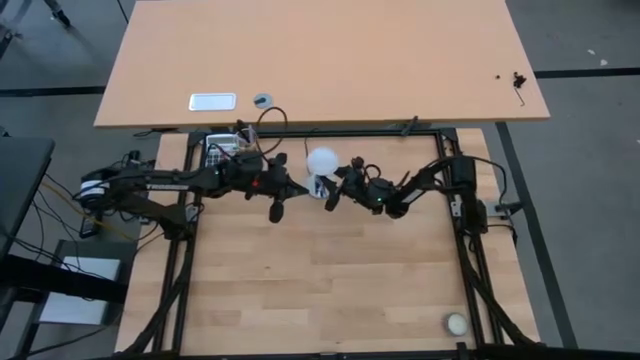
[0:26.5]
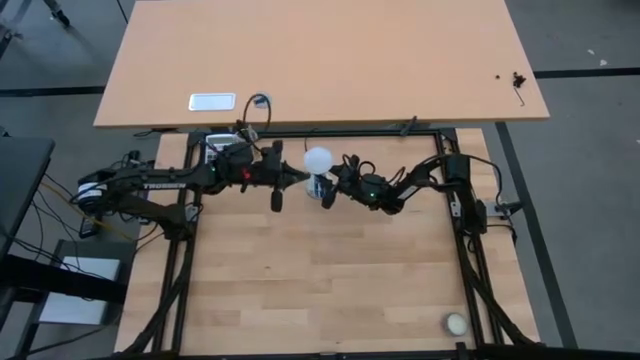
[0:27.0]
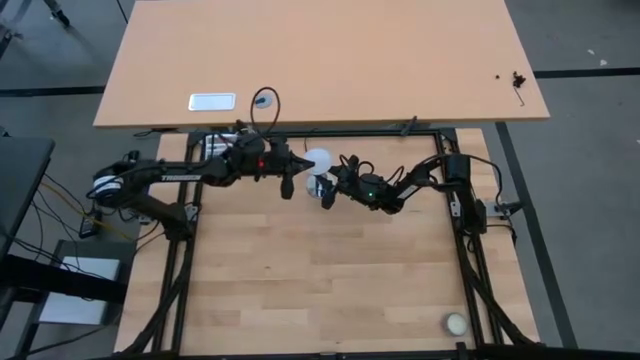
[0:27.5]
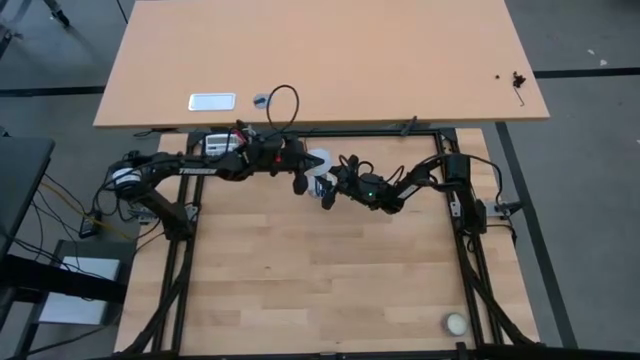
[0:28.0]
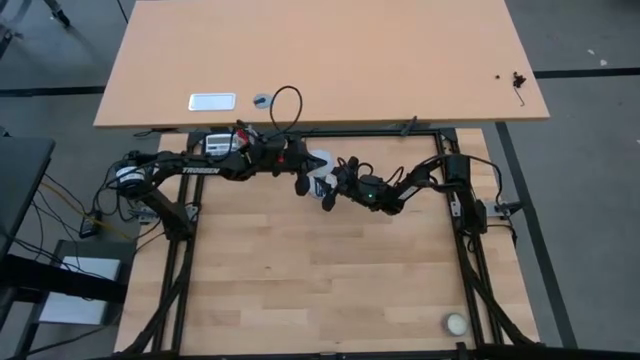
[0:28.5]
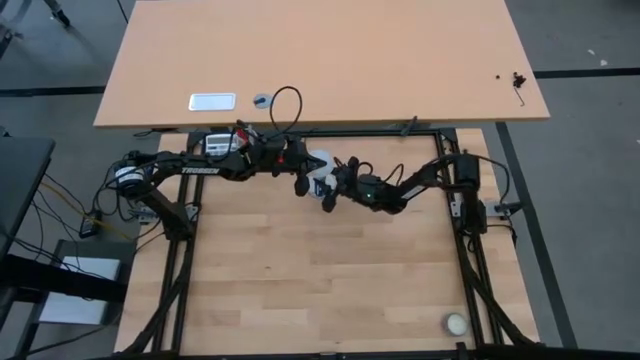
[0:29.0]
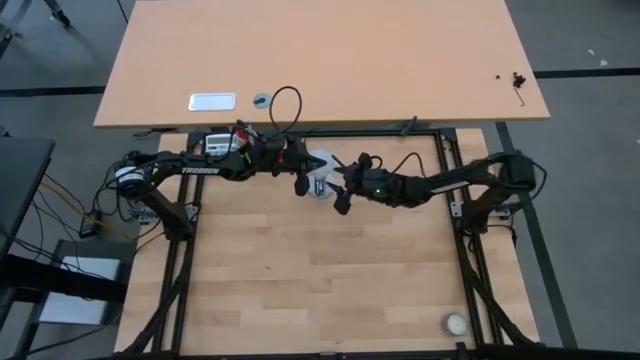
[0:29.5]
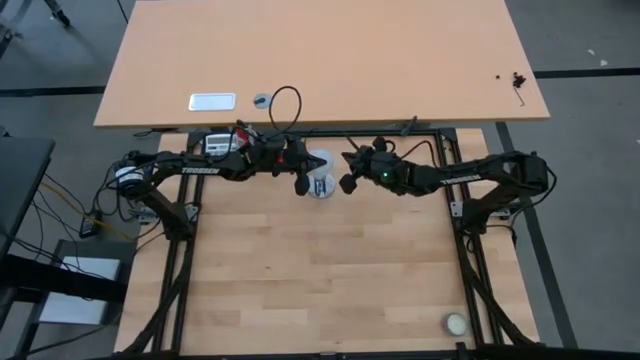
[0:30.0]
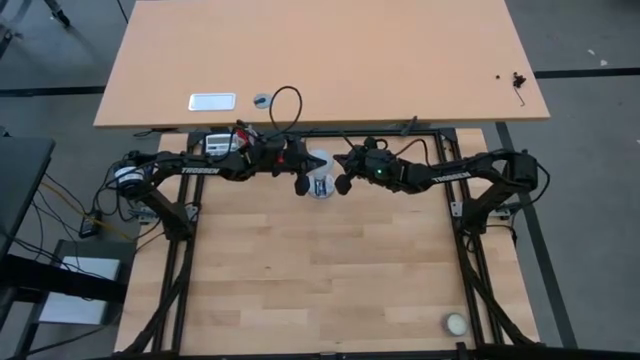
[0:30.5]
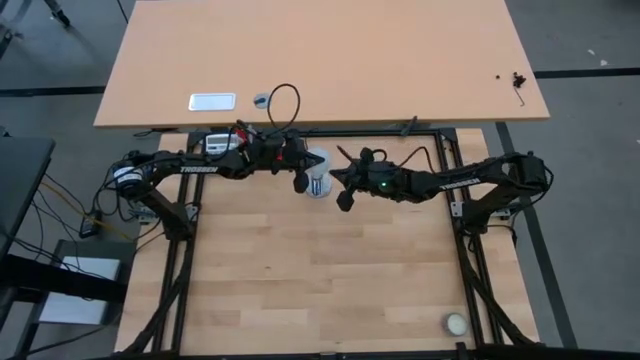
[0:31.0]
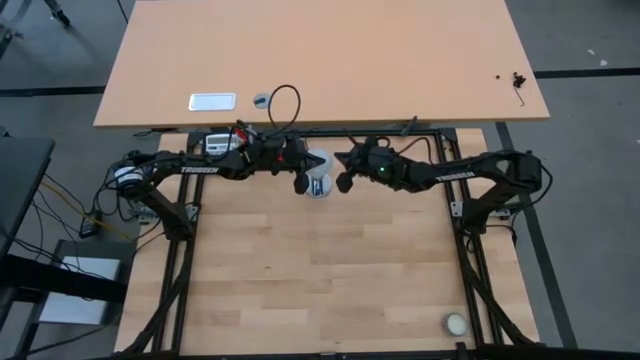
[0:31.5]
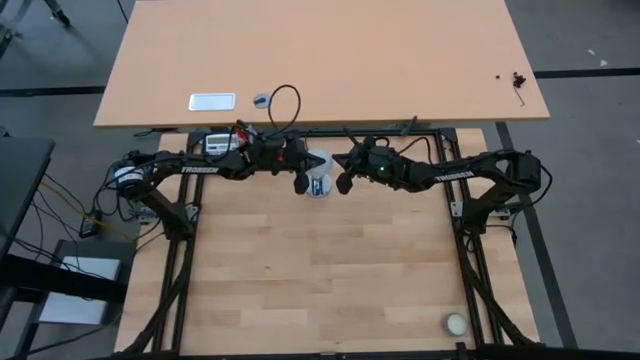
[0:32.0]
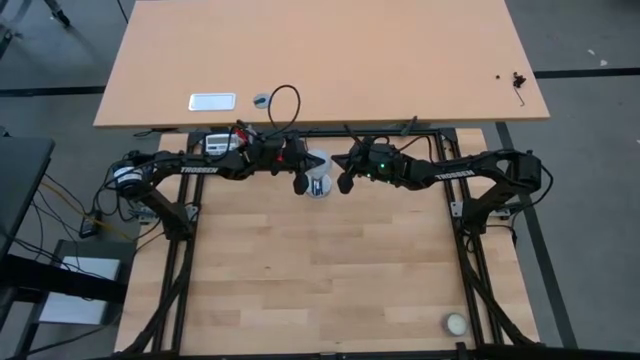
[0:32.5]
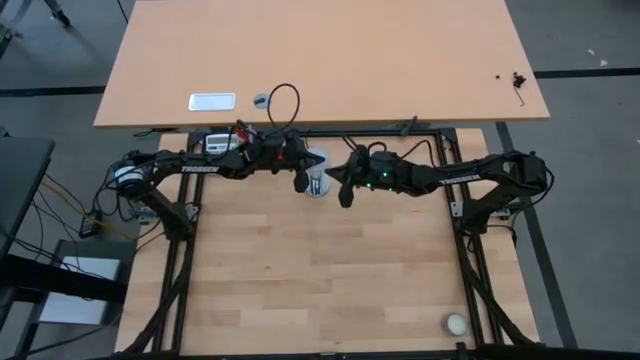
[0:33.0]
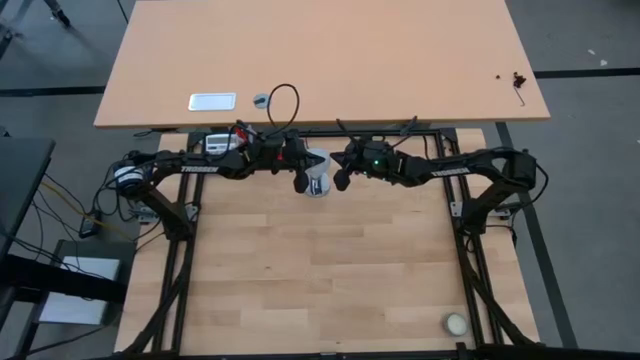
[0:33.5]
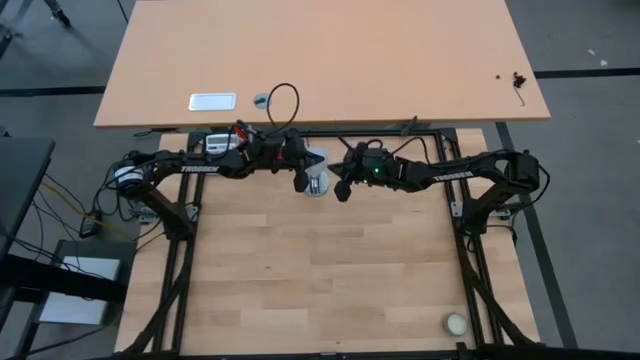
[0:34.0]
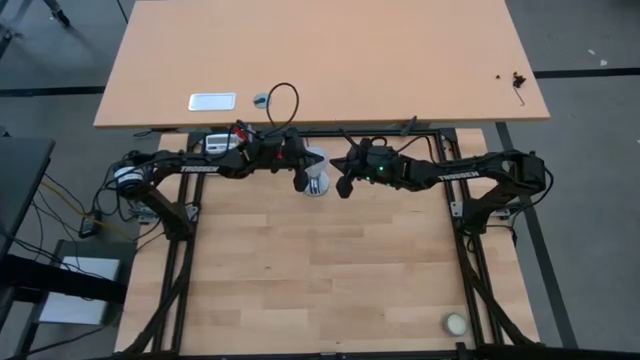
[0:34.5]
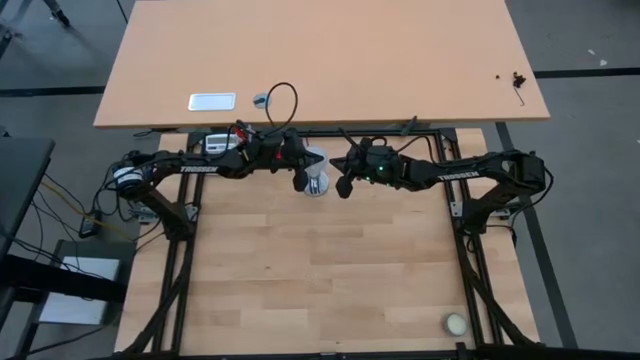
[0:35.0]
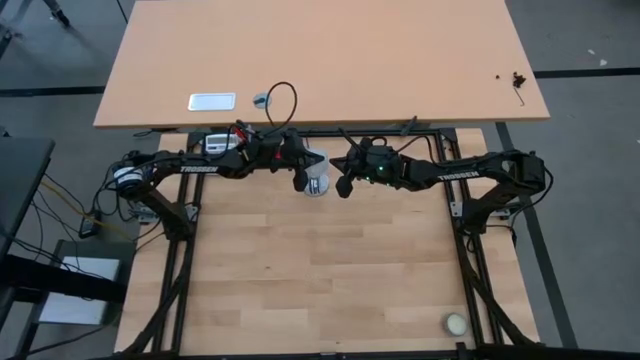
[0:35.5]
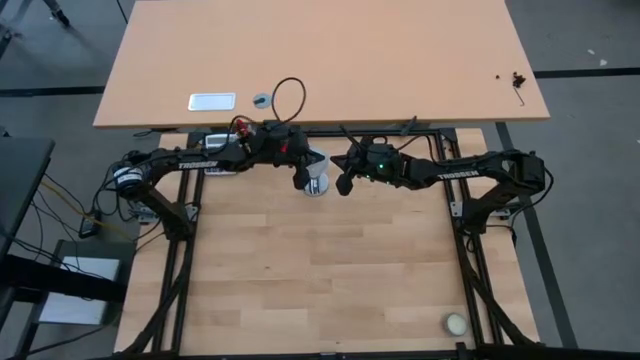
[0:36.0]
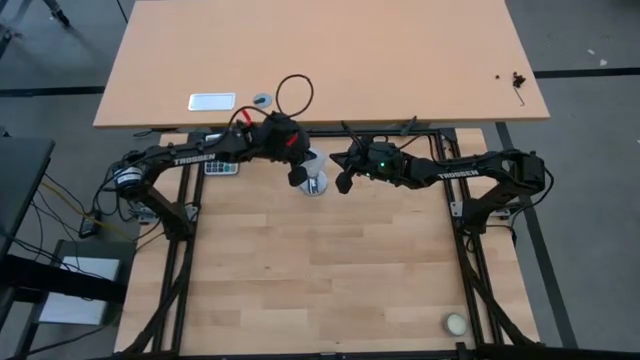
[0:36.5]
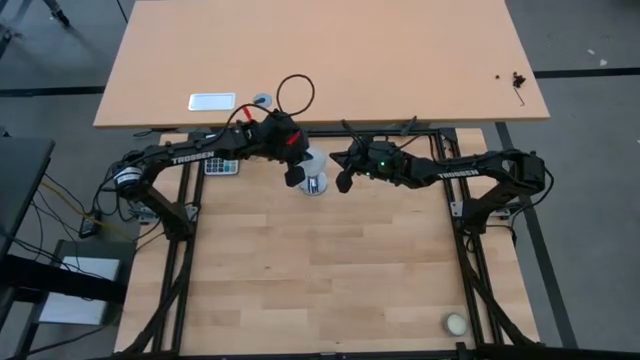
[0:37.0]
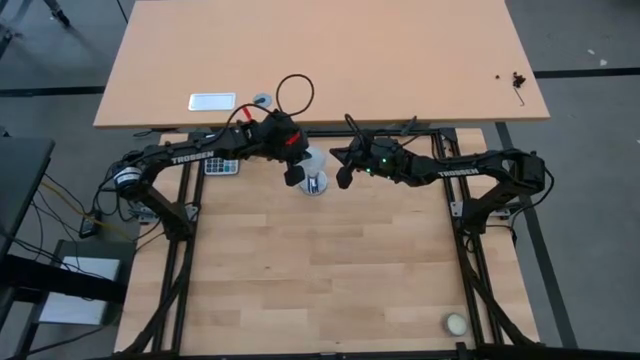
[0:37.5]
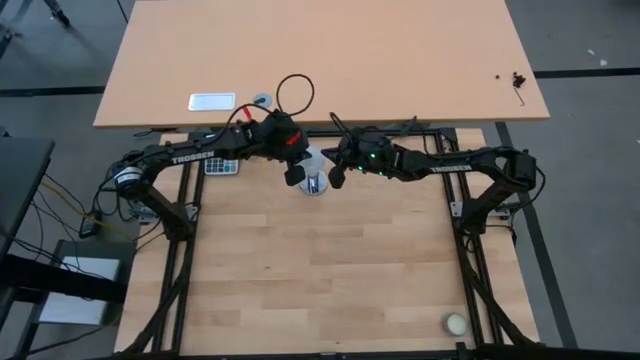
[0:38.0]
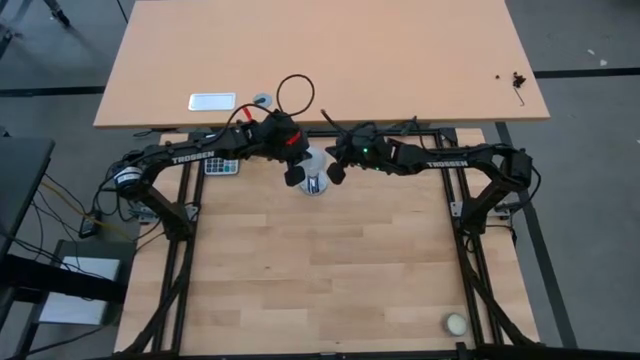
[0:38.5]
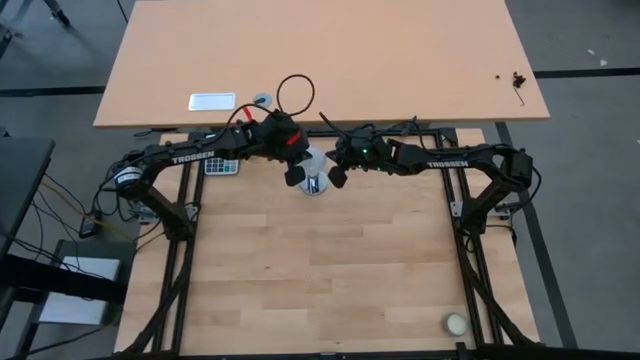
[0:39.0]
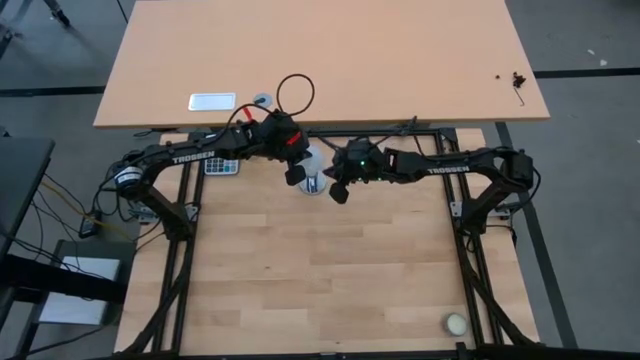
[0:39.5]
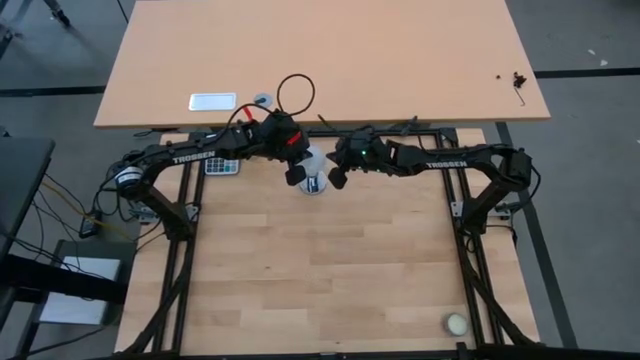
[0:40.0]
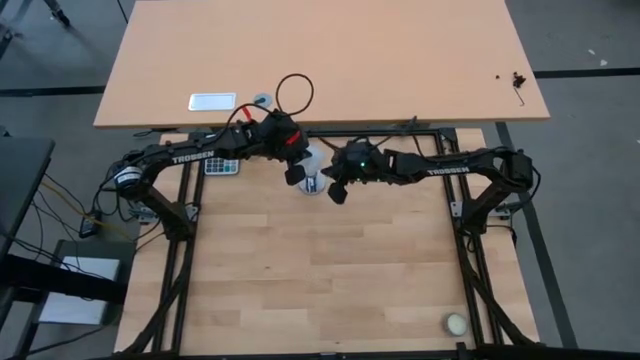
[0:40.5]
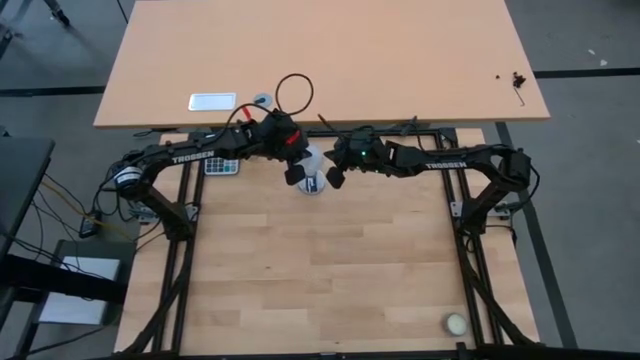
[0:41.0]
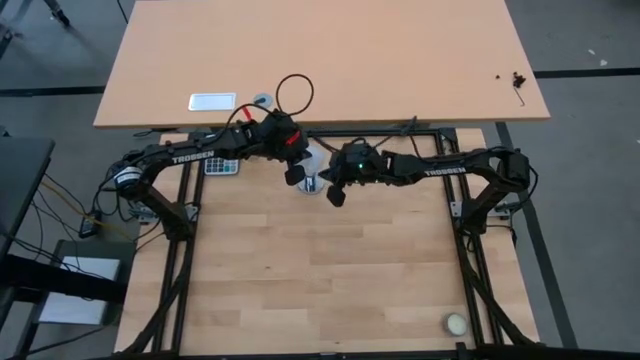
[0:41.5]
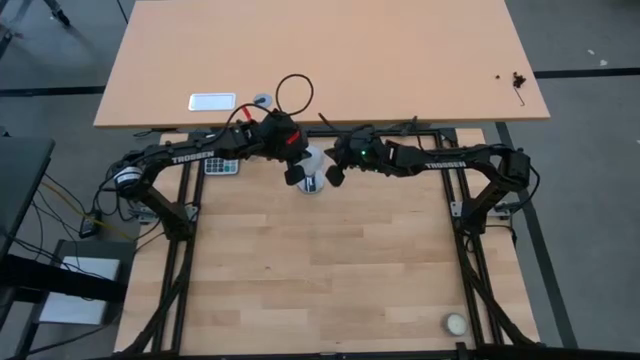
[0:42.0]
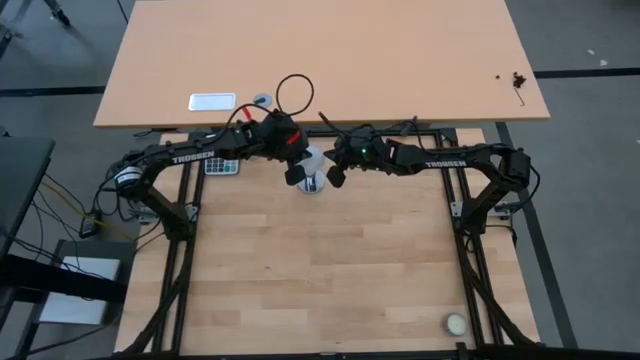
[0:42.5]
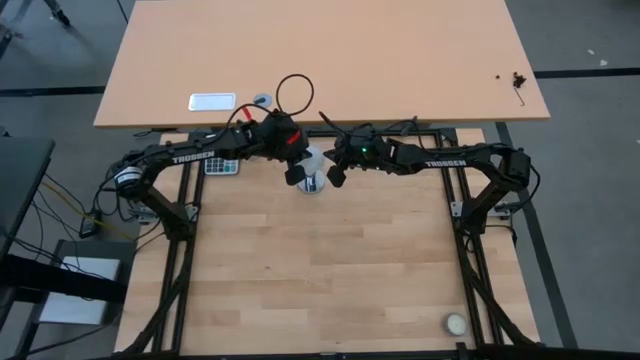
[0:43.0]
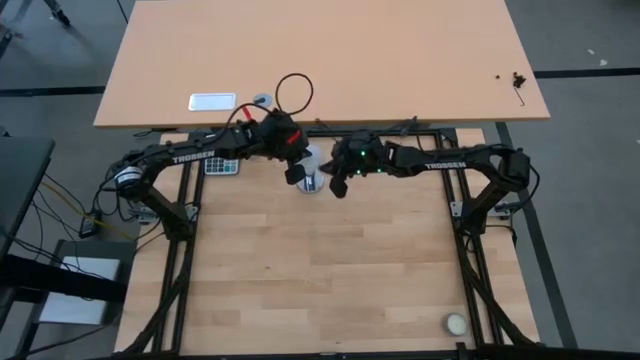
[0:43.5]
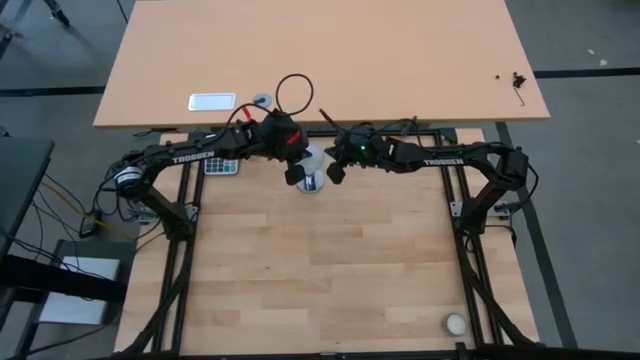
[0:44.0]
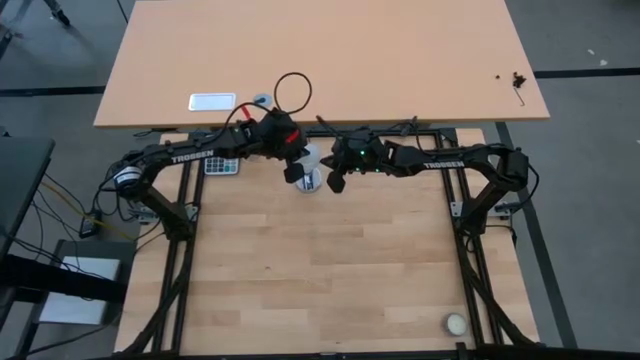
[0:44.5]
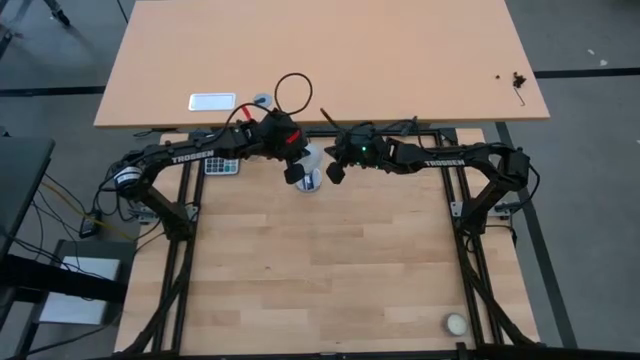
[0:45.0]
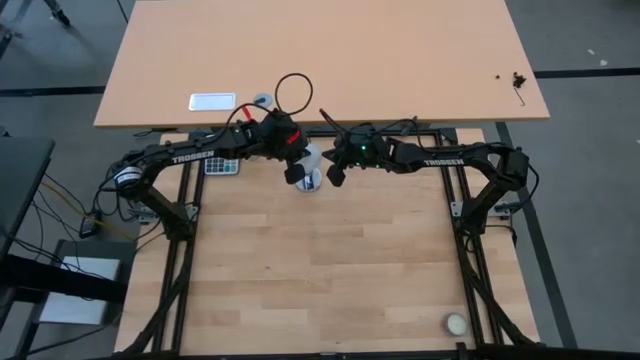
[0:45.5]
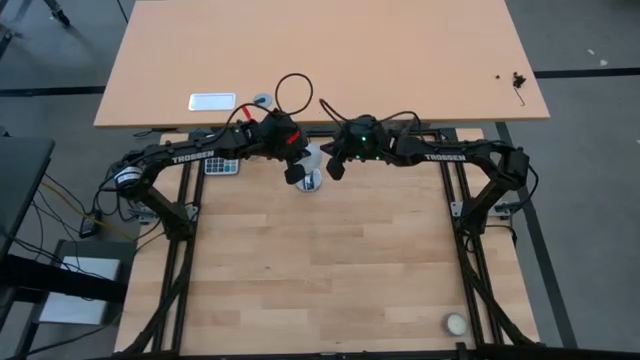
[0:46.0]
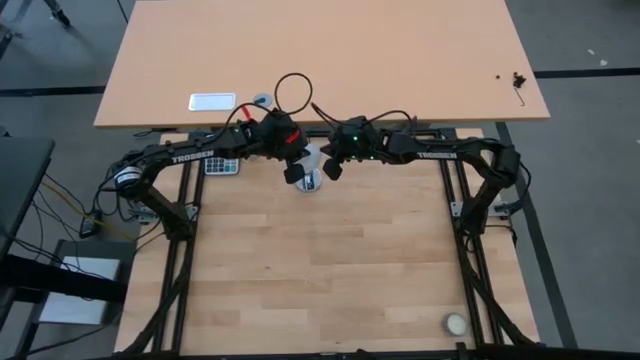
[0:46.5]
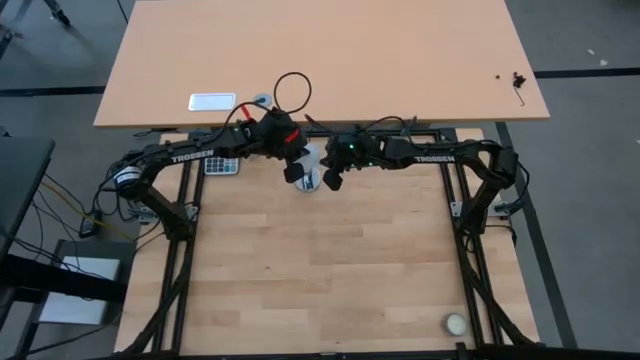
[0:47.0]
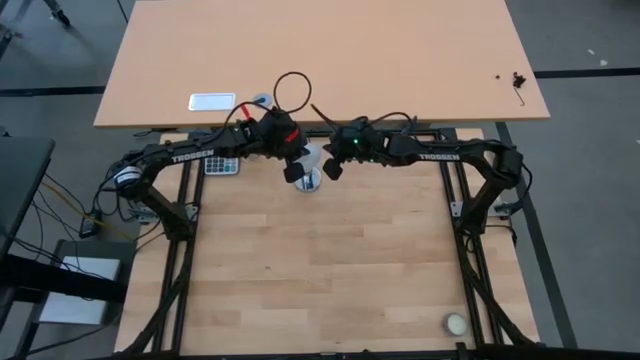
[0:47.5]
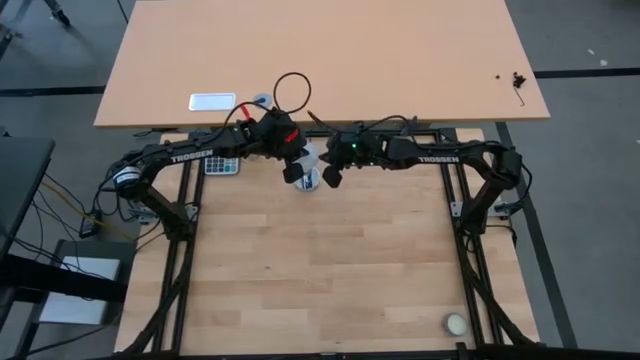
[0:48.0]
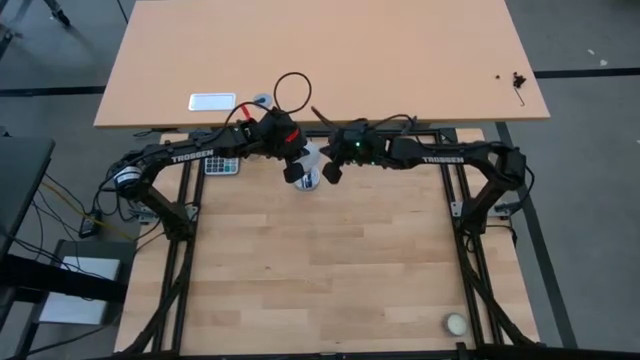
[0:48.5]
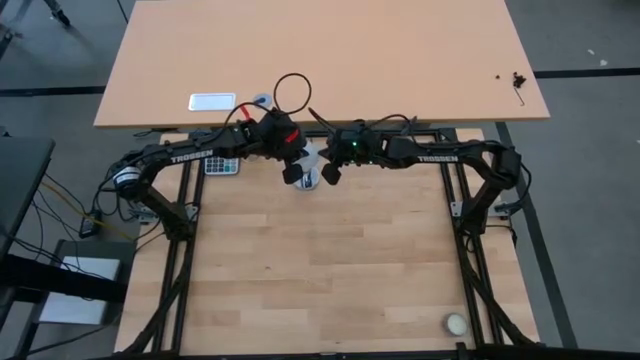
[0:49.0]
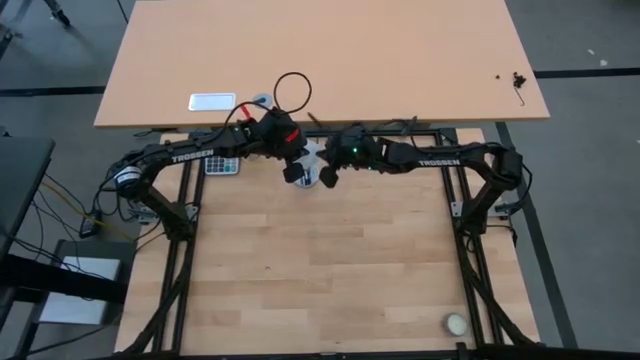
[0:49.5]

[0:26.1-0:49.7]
Task: Screw lightbulb
Insert the white lightbulb on the silver lamp
